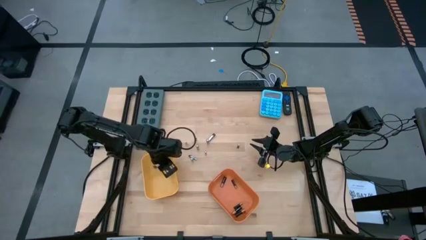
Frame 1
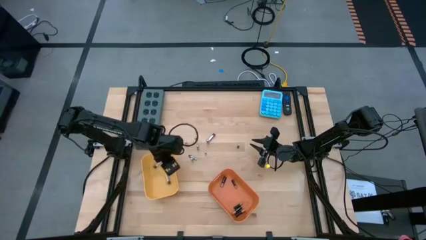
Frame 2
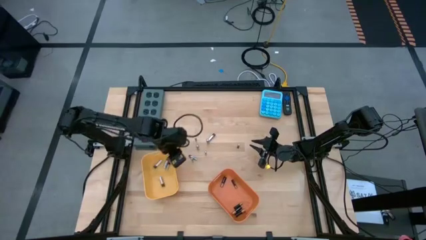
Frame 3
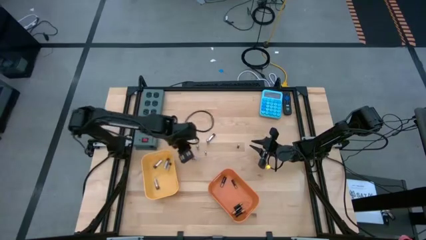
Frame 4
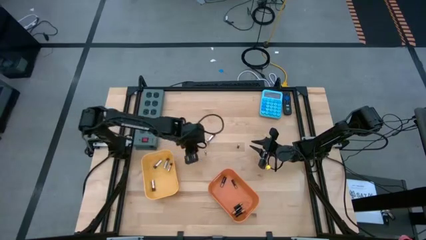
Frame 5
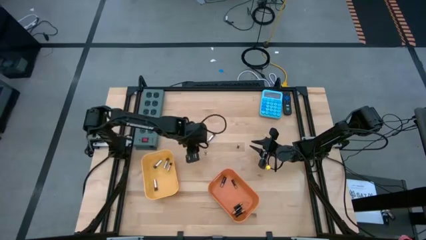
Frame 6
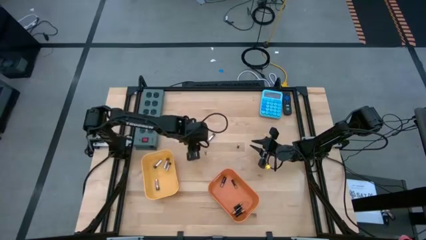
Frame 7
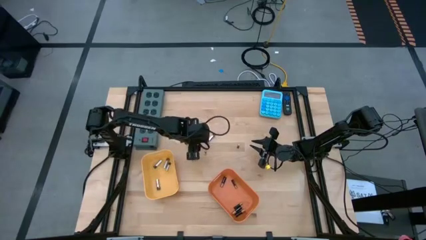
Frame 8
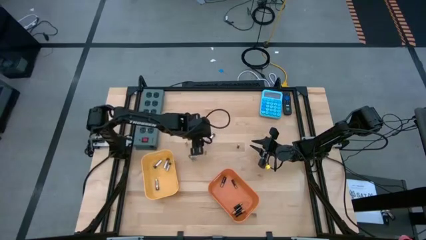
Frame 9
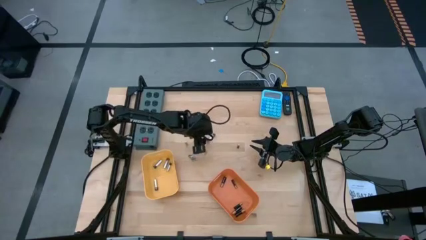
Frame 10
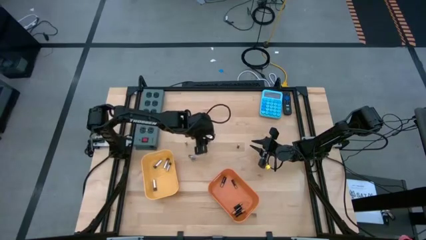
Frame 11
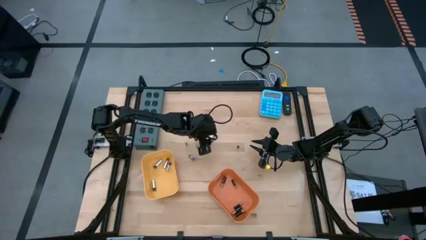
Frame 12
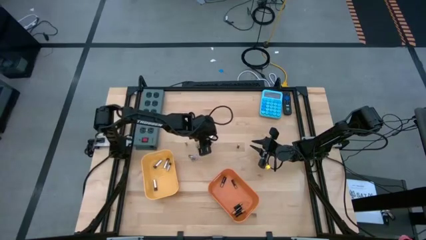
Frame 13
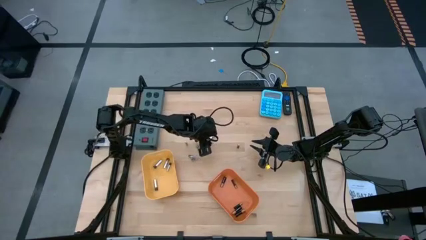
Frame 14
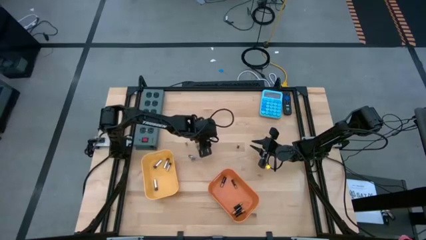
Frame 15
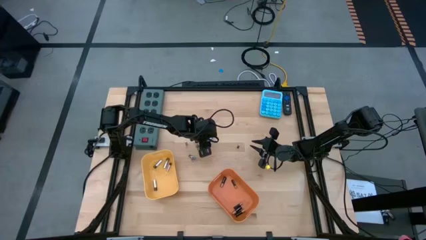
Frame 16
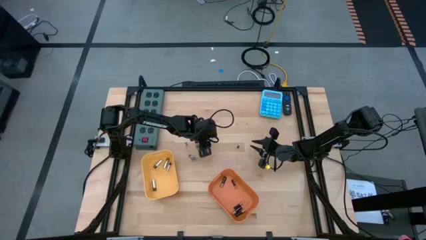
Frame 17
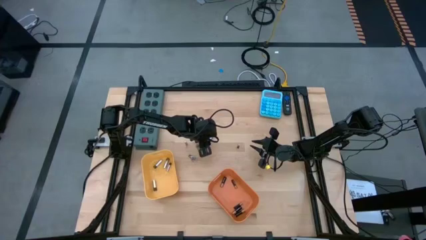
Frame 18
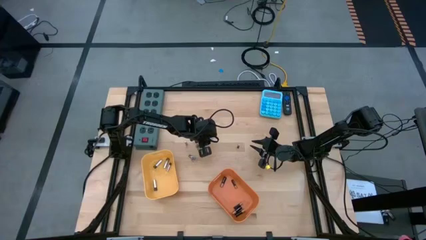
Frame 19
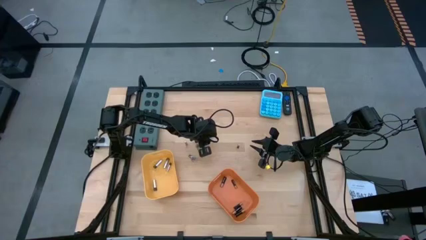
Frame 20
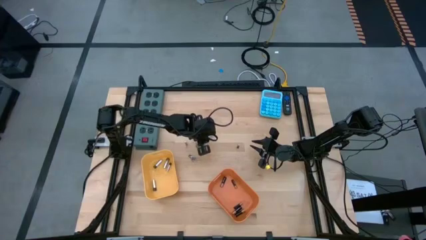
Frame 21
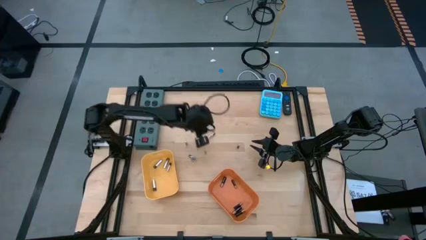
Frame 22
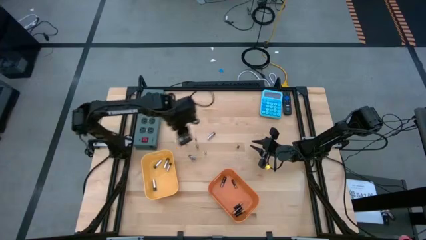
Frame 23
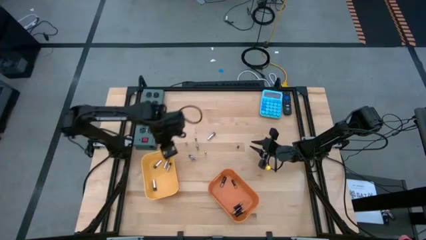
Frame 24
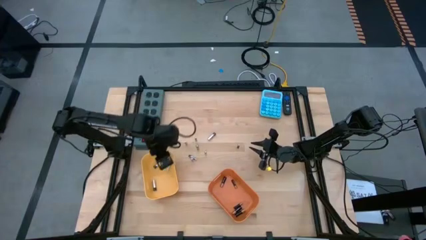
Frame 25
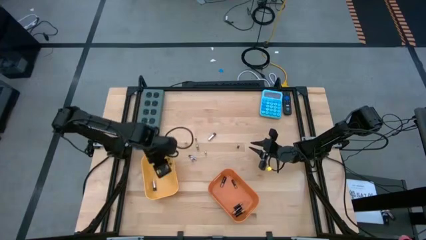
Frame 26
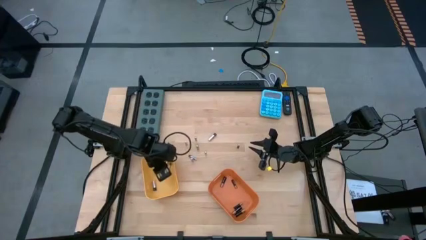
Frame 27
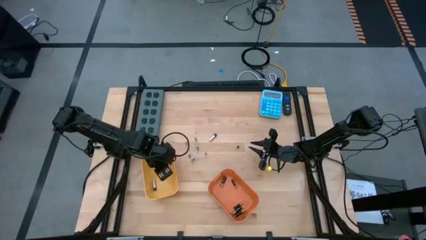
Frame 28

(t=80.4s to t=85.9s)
Task: Sort batteries
Put the silver battery into the yellow bin

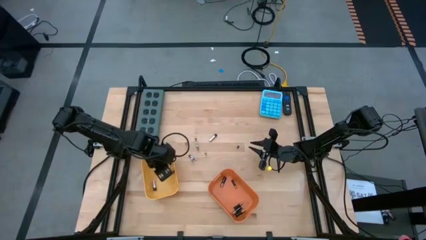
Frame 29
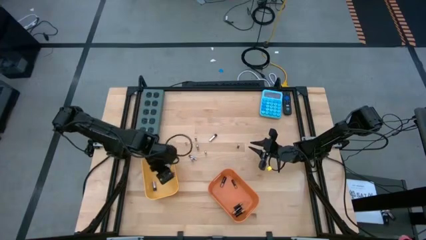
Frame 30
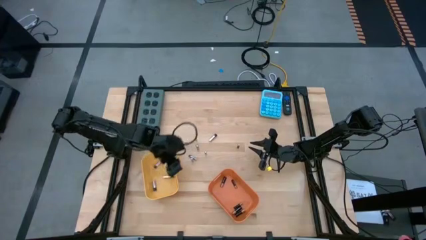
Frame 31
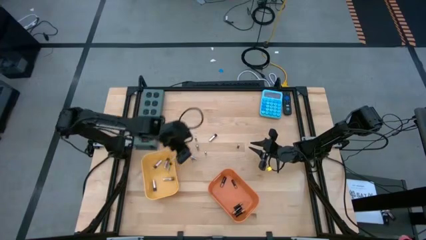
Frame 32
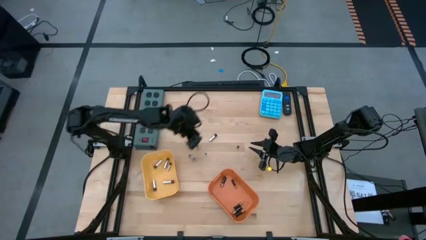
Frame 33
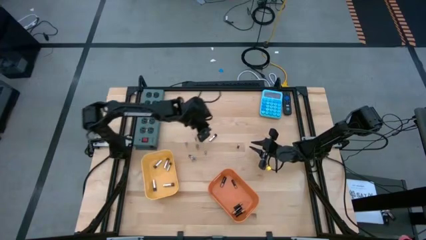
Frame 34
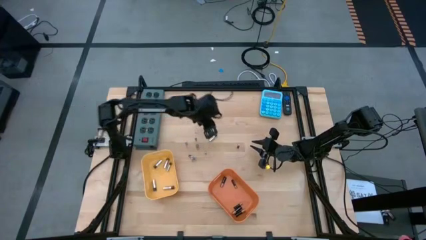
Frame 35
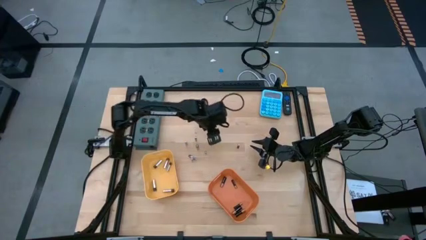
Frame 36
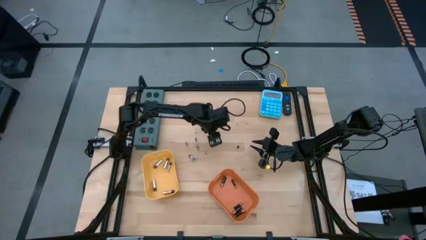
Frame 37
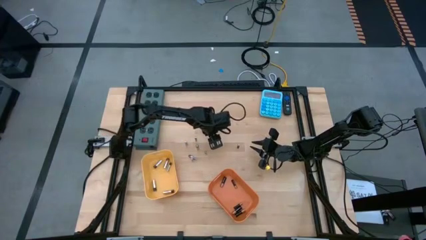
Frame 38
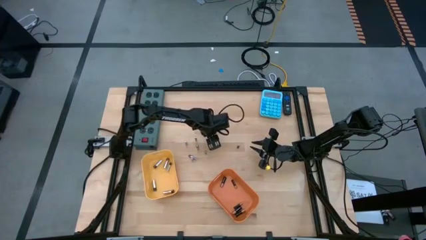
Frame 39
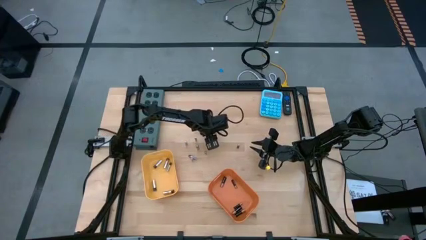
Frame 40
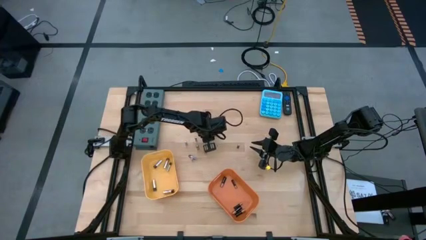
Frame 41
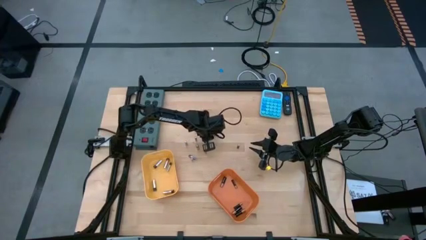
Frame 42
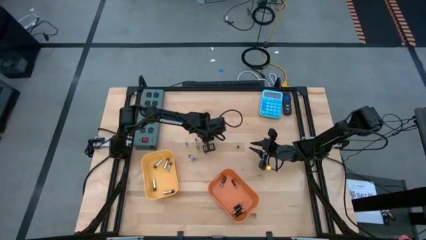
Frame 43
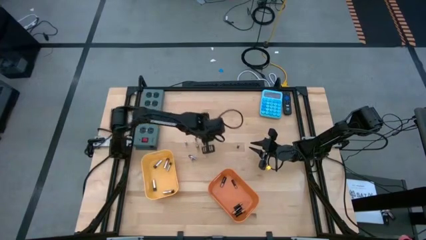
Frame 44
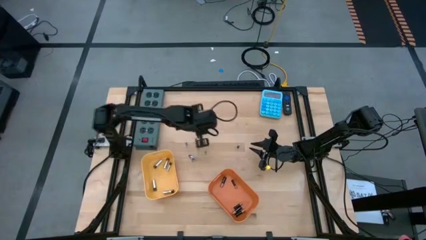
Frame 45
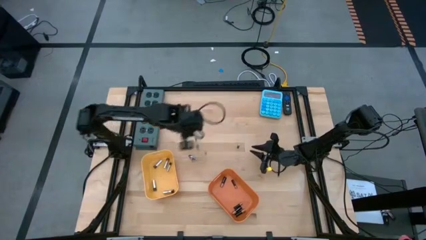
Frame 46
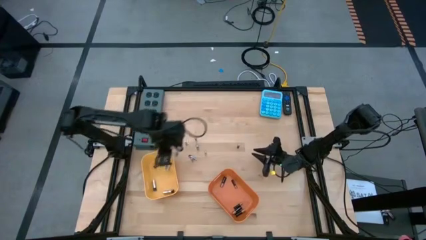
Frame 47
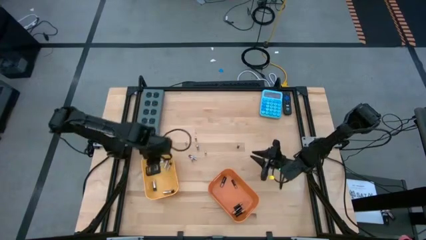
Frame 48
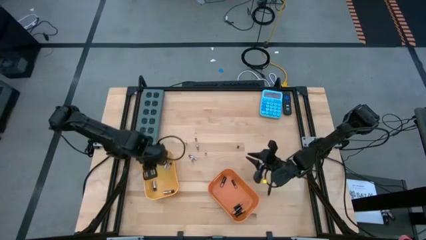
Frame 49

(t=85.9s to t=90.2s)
Put the silver battery into the yellow bin

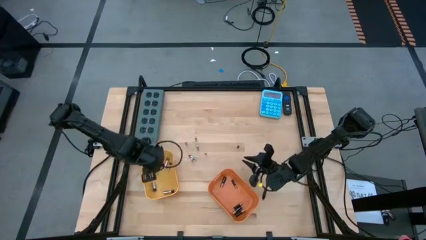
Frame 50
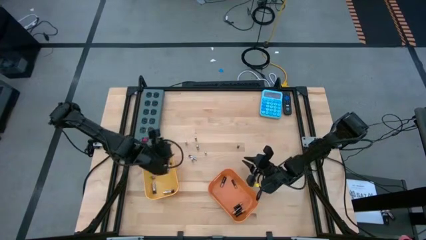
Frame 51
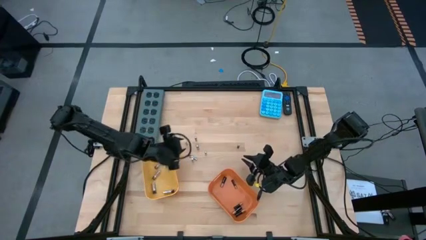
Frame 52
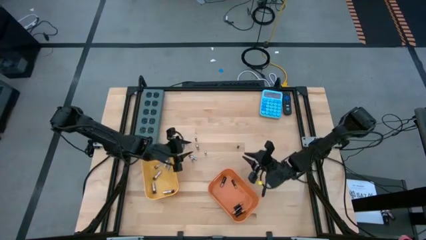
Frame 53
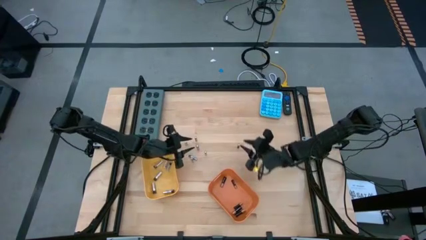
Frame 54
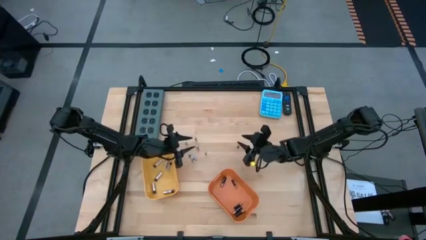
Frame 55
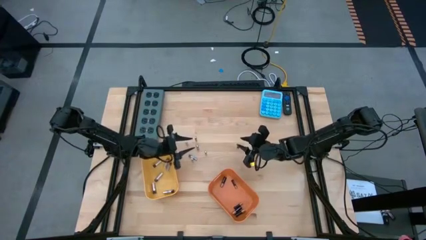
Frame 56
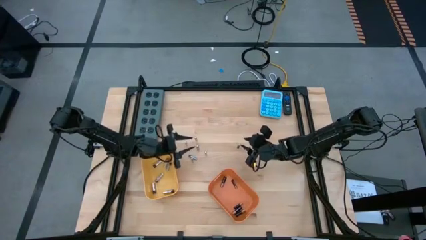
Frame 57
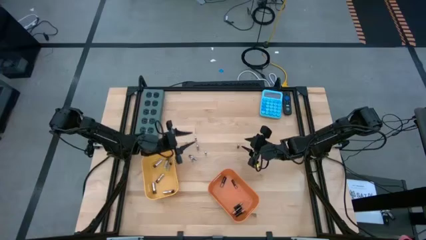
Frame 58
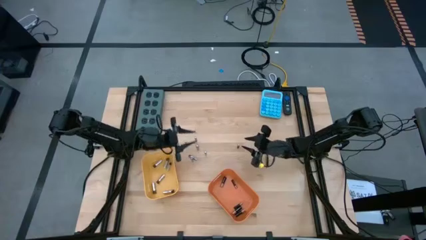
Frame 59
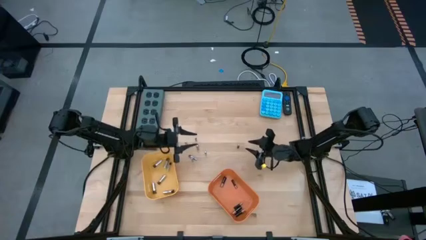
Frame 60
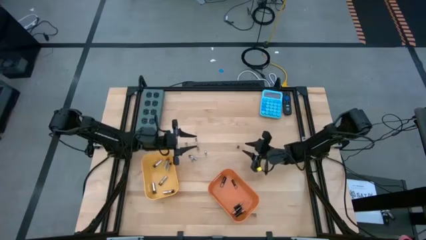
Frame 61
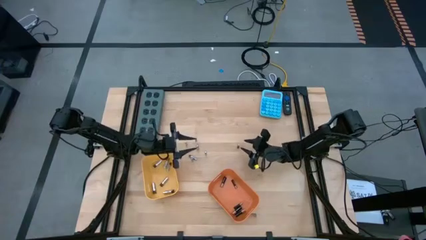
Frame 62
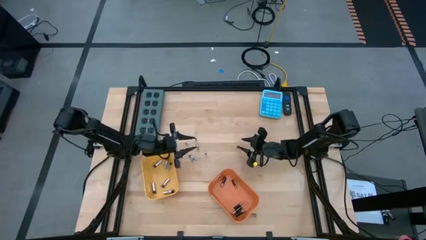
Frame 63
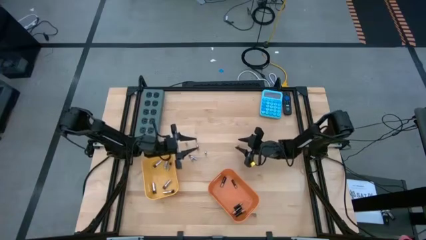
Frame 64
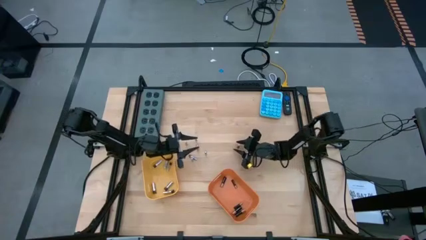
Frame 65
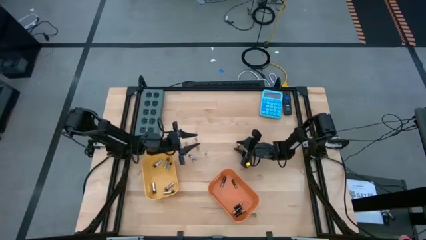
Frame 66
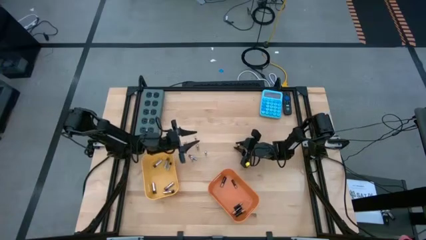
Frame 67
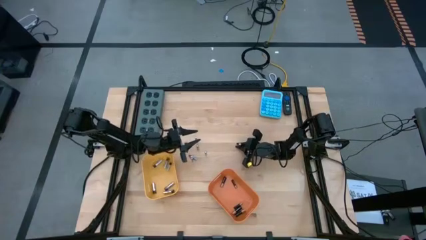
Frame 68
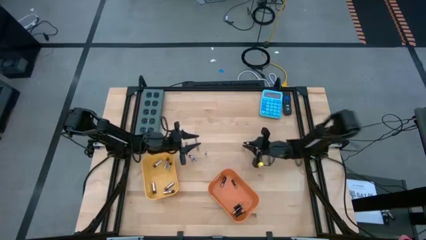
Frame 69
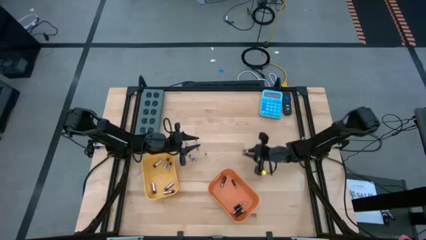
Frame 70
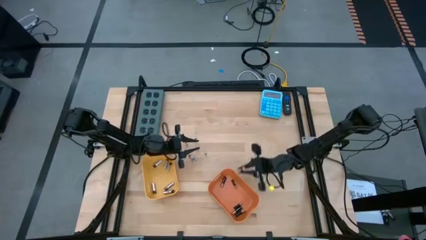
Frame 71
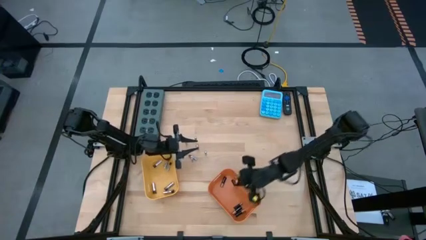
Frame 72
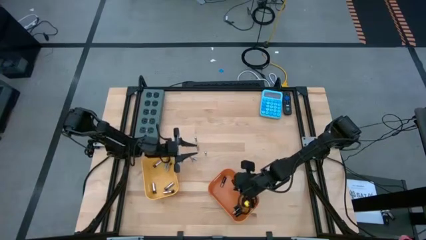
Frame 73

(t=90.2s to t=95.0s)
Put the brown battery into the orange bin

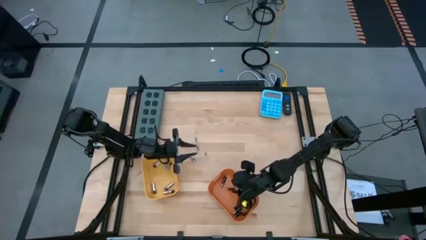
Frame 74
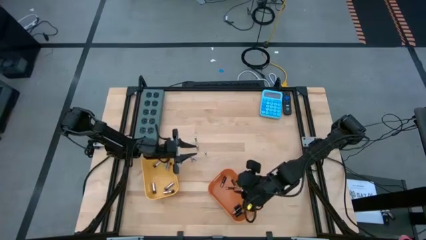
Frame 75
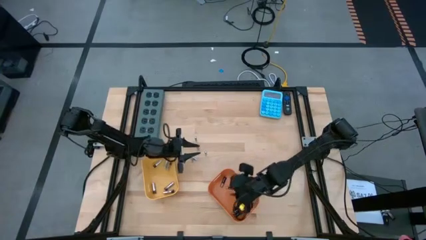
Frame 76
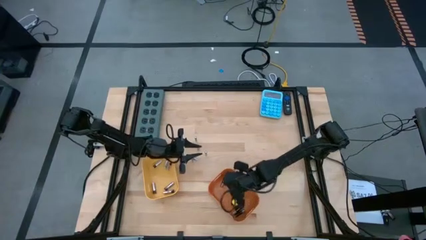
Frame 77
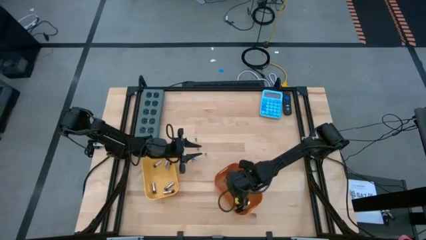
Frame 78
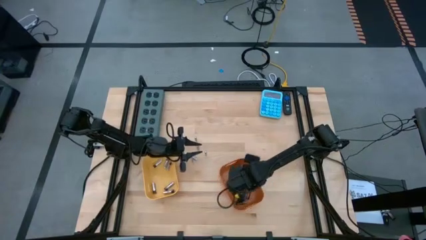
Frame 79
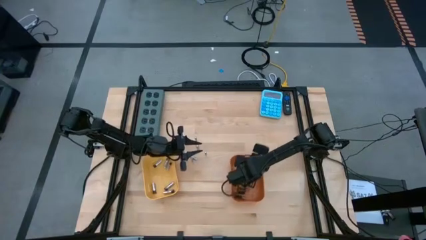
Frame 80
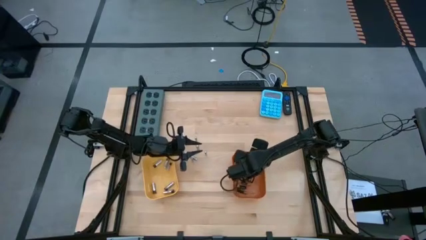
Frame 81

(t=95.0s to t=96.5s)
Adjust the orange bin
